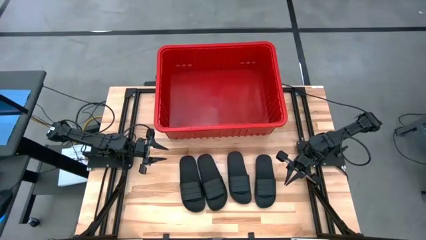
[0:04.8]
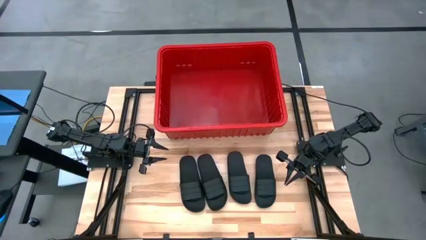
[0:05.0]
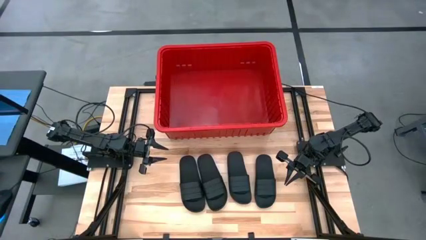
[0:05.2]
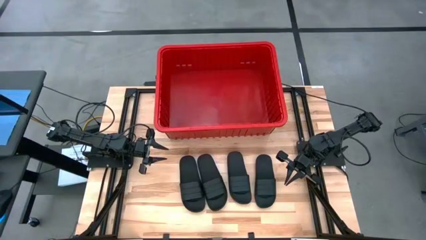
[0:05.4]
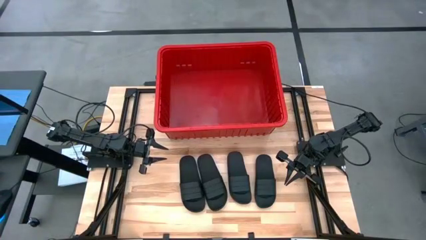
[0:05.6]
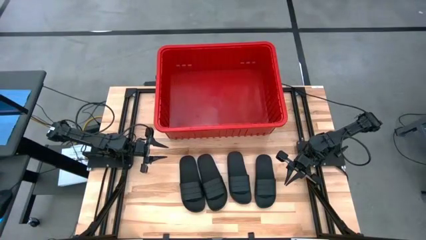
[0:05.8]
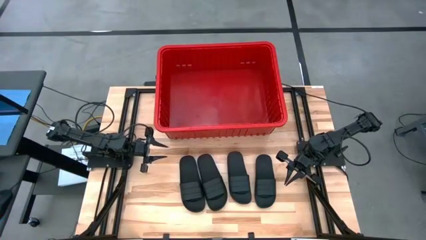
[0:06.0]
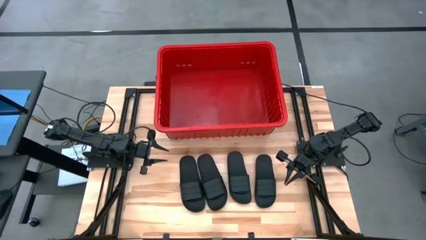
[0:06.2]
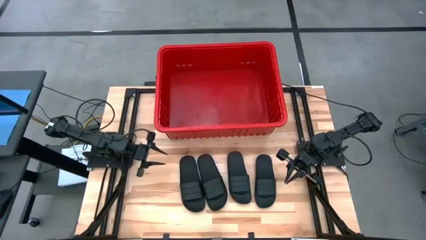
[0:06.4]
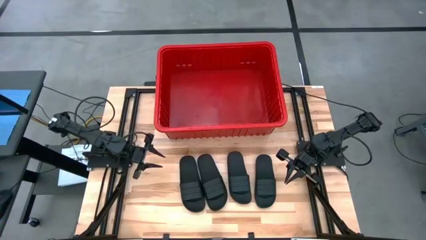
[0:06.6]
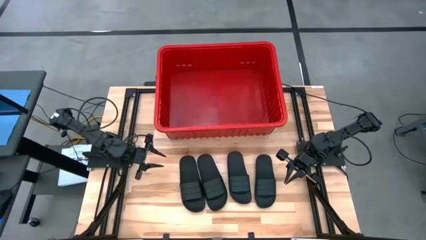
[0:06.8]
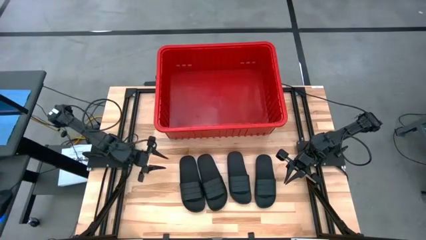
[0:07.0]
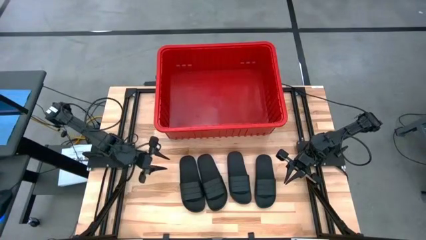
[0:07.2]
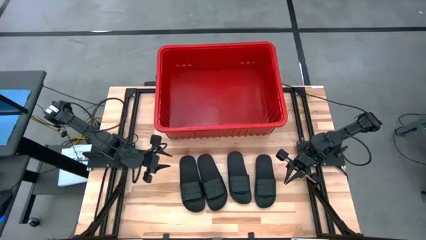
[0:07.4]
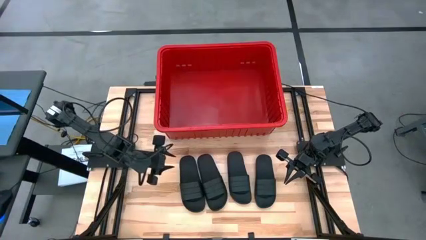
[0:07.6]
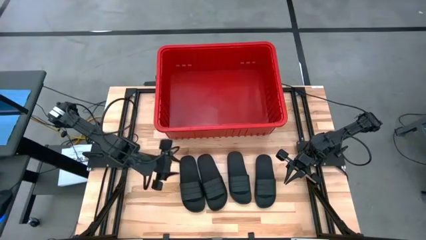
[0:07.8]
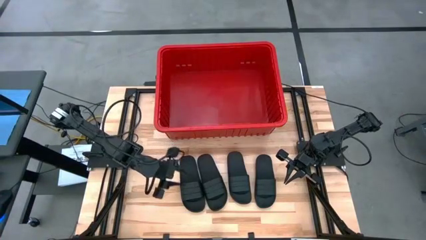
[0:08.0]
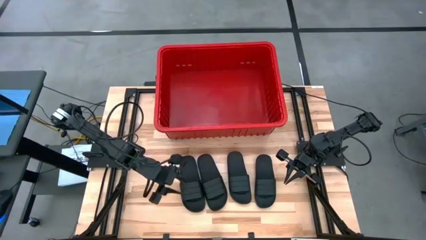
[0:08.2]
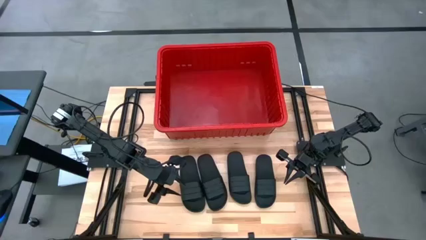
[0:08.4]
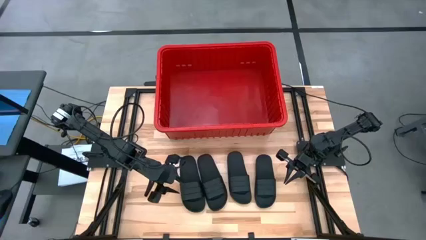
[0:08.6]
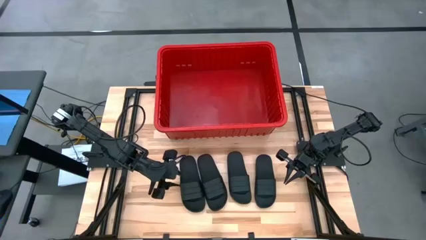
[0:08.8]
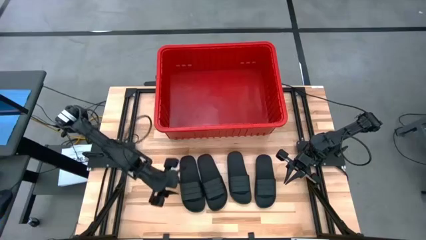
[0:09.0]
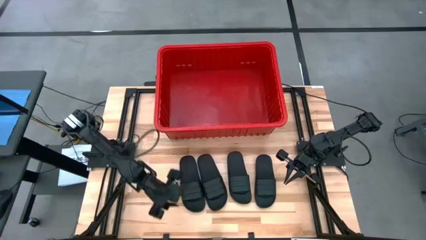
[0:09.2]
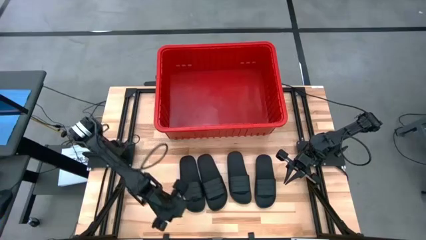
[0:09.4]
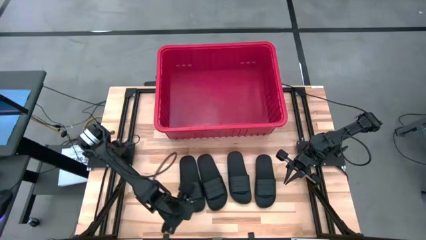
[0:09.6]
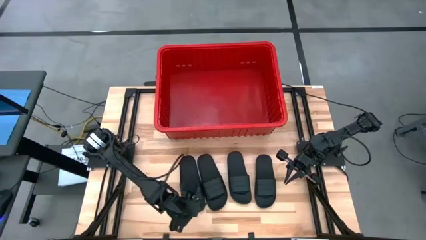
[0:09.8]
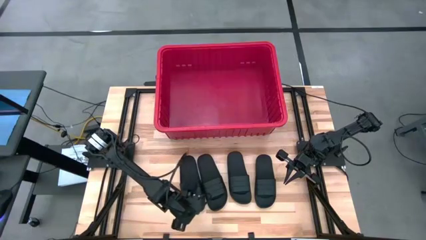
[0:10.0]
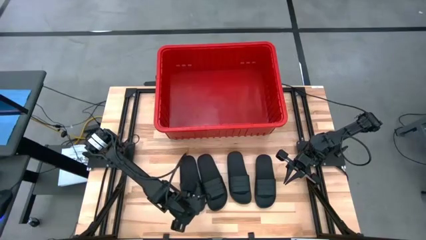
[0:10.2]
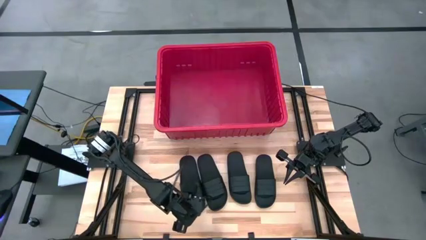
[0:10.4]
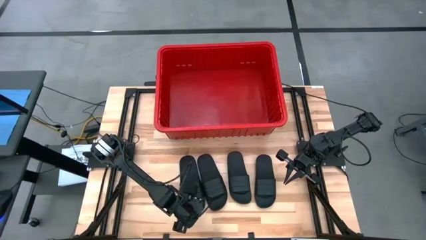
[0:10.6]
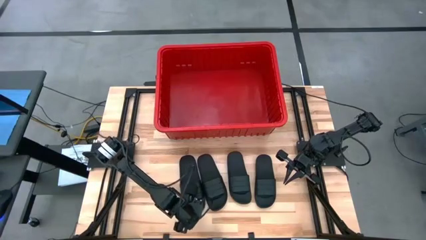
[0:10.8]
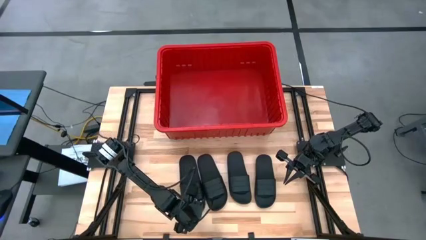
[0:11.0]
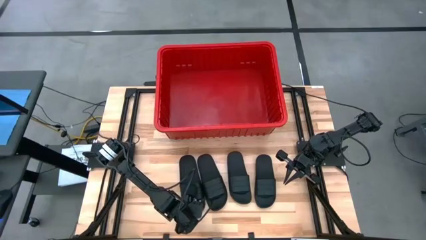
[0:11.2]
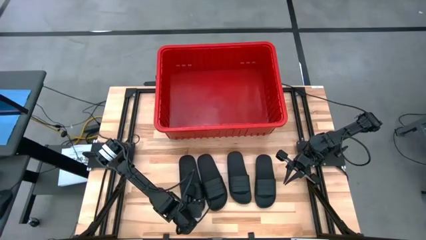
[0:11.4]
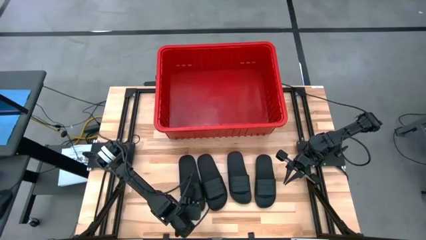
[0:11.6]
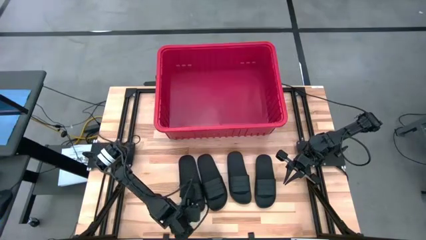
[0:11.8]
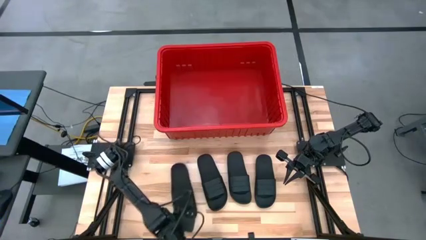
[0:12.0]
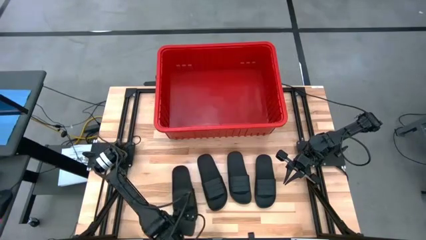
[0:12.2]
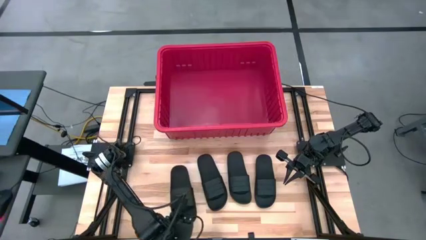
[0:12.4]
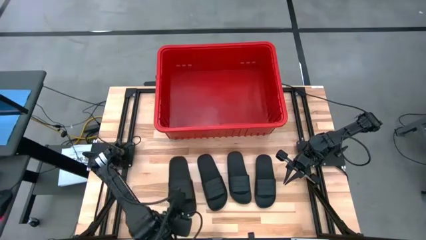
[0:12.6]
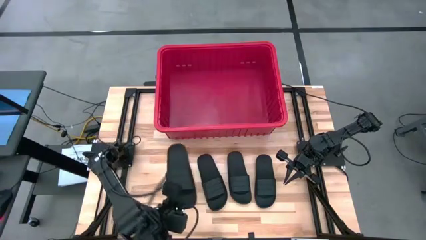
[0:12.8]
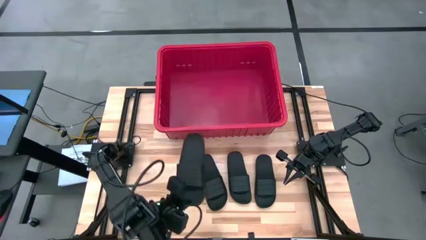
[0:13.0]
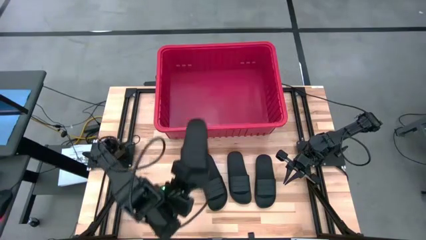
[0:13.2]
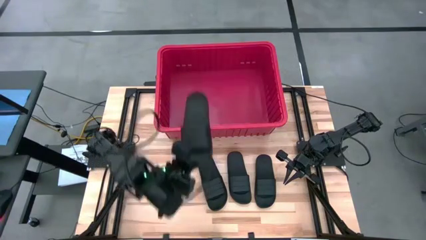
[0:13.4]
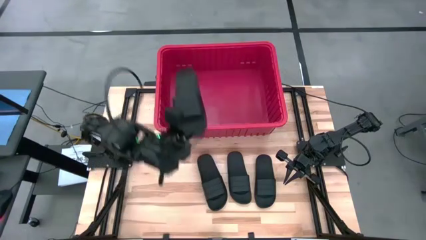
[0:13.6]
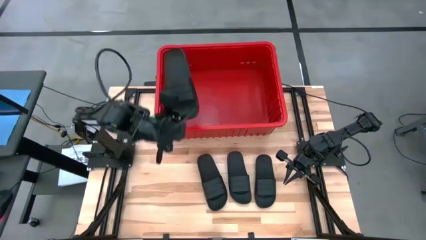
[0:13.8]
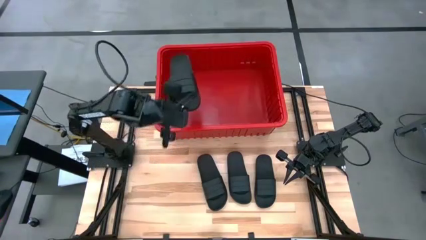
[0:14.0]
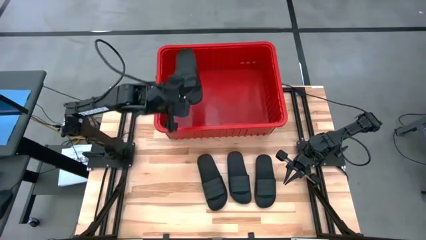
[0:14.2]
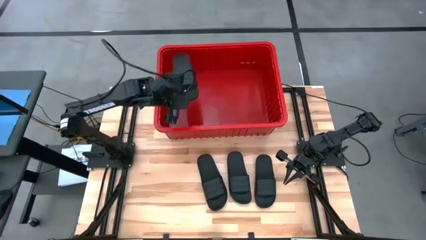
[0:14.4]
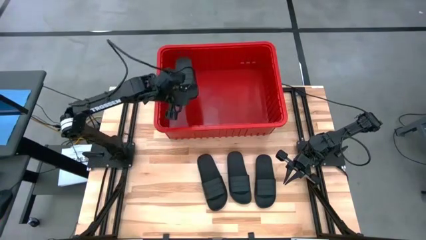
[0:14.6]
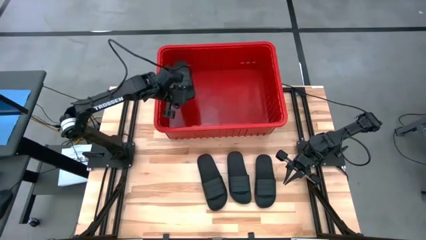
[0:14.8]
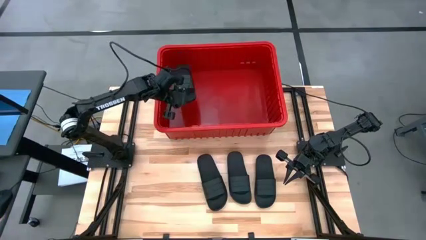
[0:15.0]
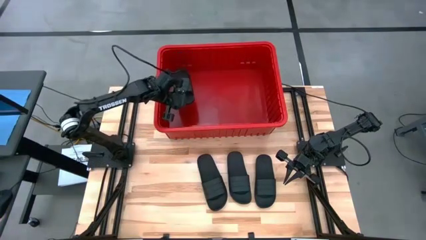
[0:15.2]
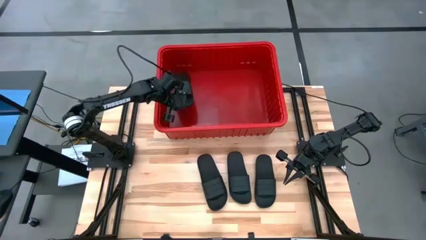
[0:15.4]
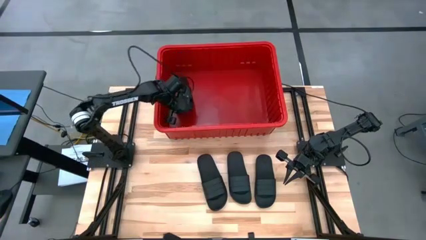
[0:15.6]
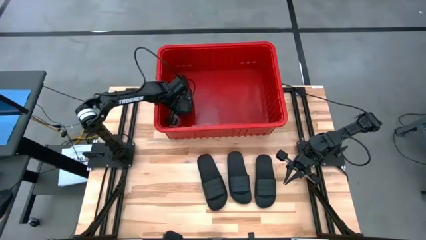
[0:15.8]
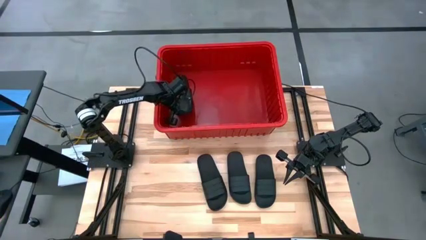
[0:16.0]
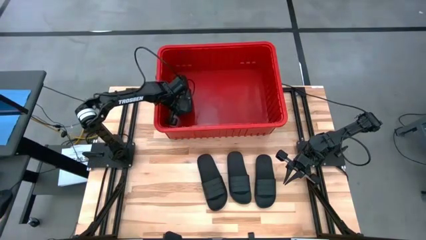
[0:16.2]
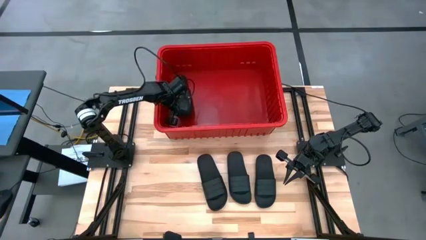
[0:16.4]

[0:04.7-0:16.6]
Task: Pick and place slides into bin
Put the black slipper into the red container

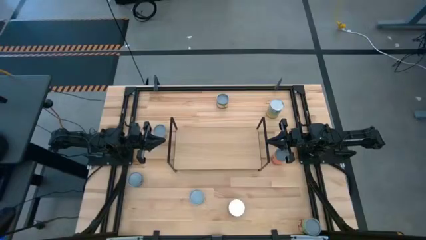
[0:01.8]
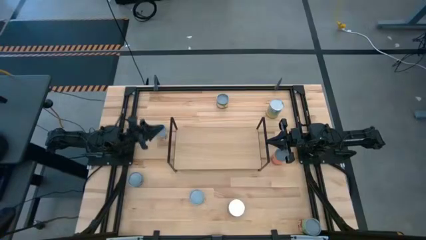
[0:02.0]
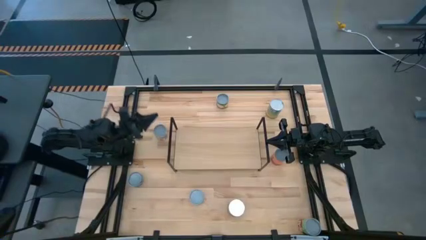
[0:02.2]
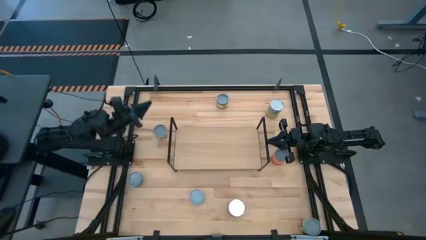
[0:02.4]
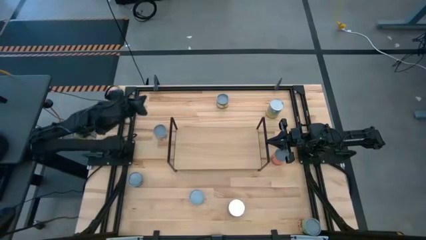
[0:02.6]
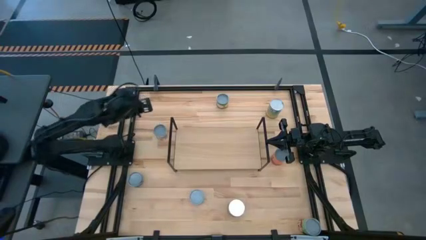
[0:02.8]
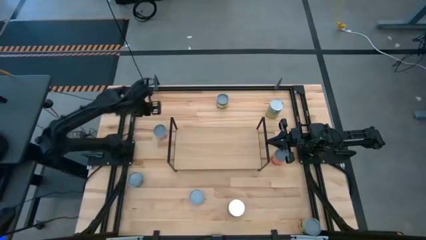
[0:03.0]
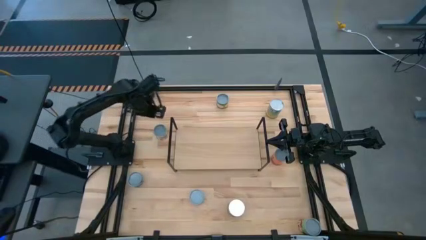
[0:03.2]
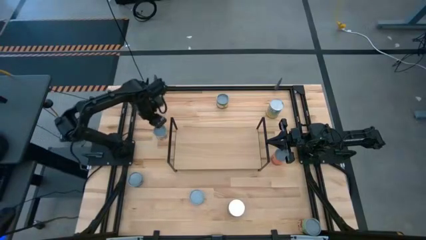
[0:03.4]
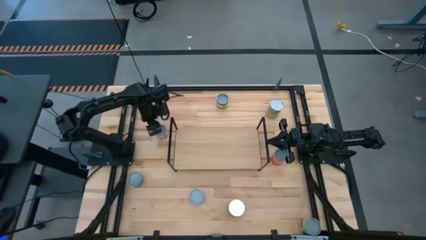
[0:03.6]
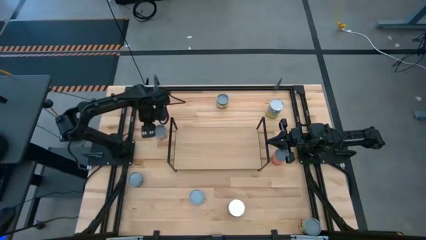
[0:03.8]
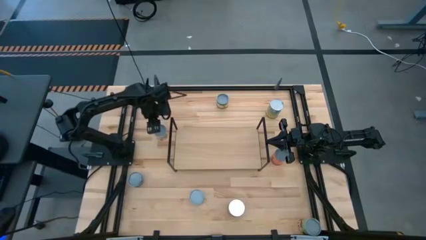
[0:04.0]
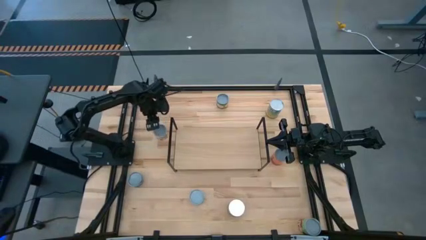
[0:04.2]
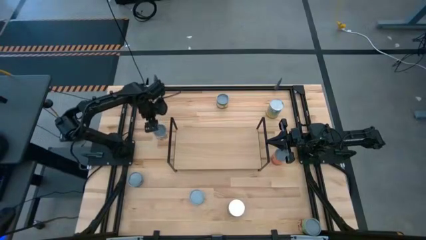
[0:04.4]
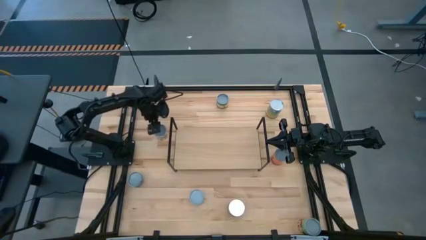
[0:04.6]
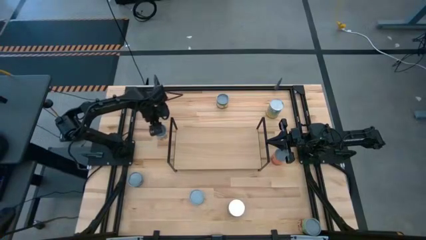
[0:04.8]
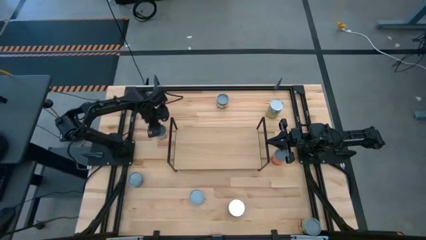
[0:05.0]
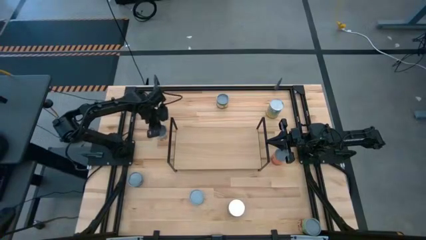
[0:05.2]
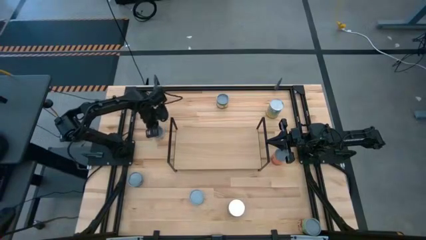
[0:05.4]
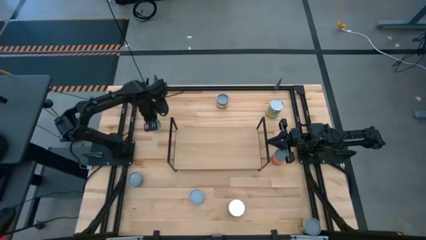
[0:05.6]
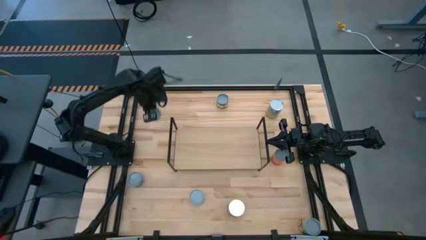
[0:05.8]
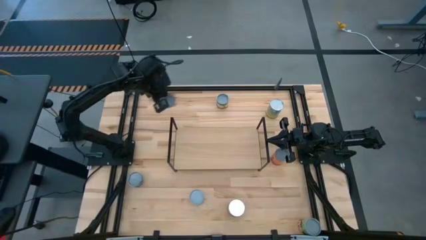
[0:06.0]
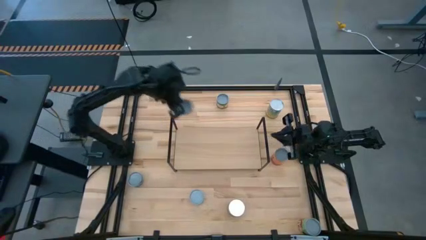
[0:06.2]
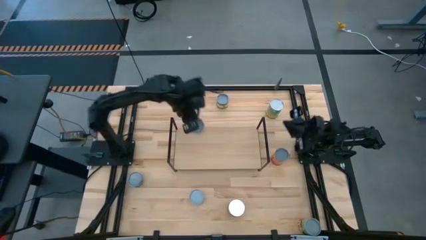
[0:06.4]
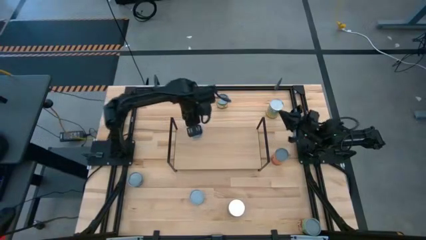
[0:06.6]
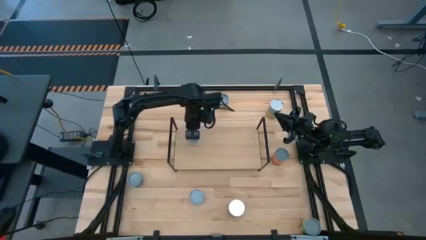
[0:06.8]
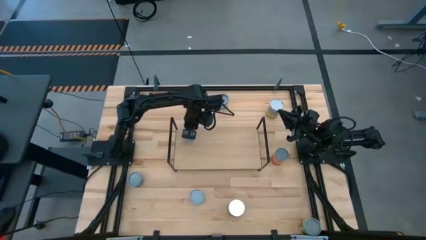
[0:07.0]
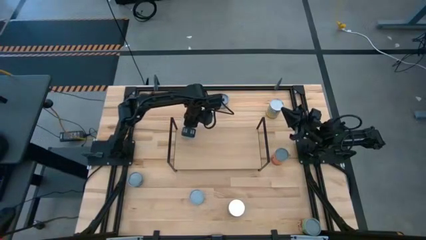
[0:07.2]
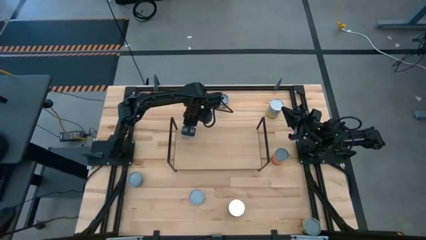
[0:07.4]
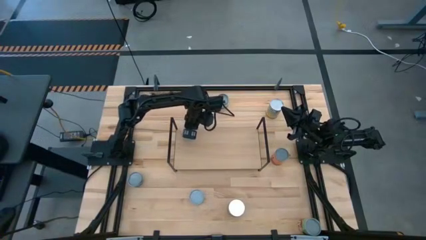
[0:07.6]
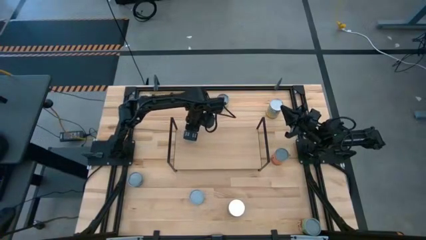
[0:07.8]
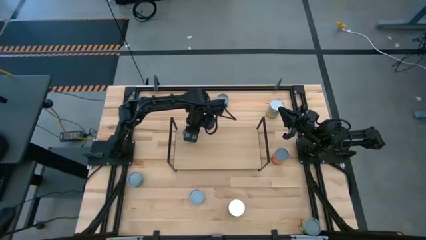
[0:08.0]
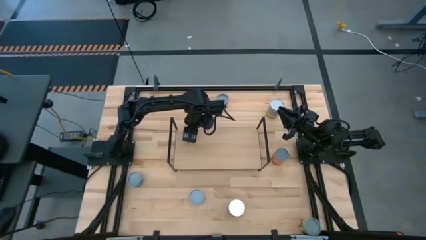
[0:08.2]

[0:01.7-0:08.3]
Task: Pick and place cans onto a shelf
Put the canned tomatoes on the shelf
